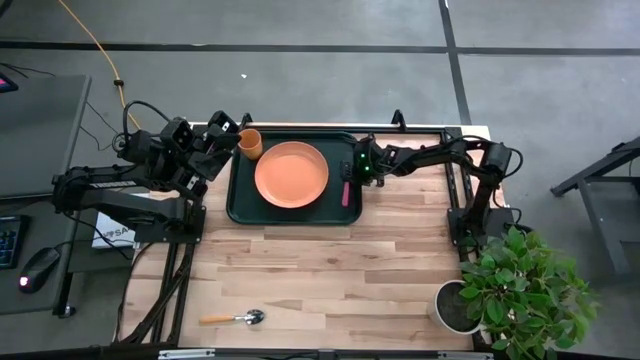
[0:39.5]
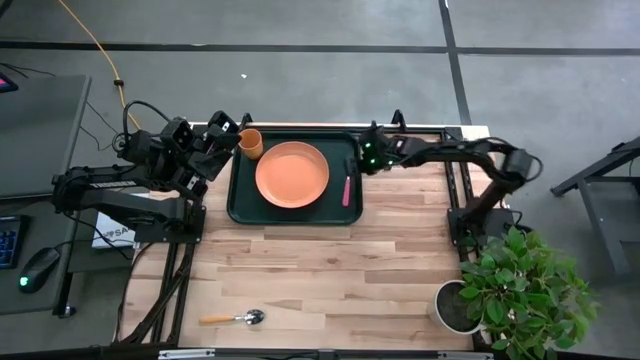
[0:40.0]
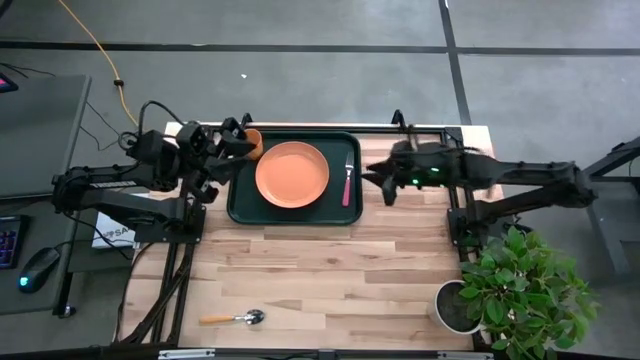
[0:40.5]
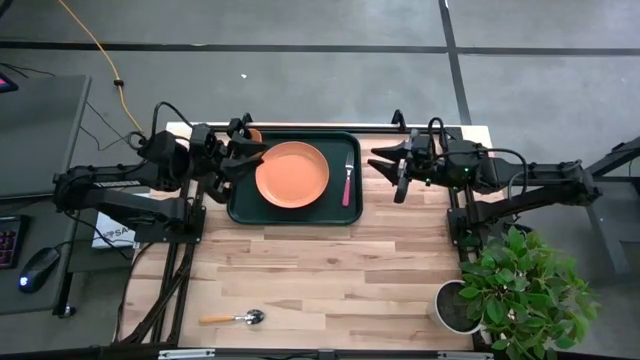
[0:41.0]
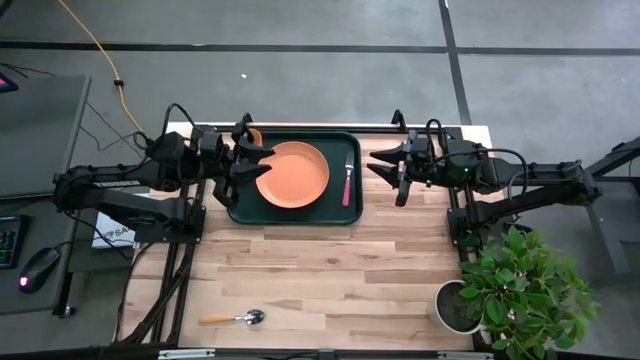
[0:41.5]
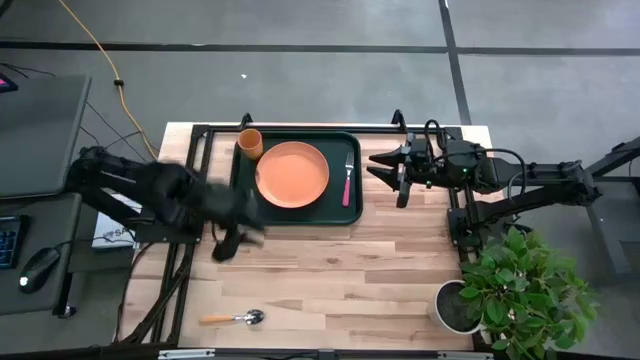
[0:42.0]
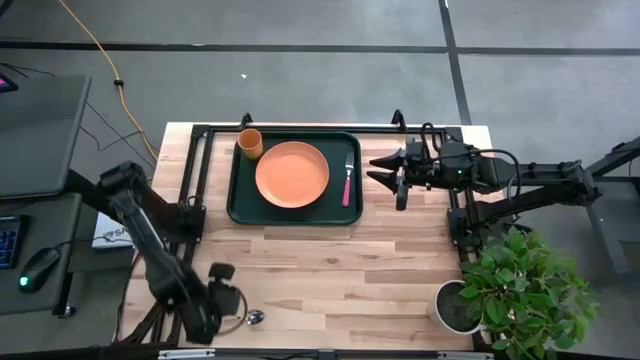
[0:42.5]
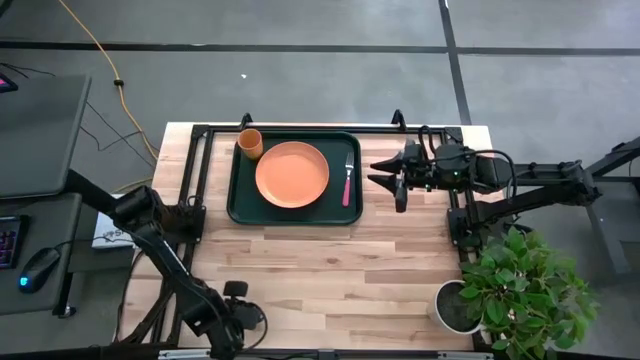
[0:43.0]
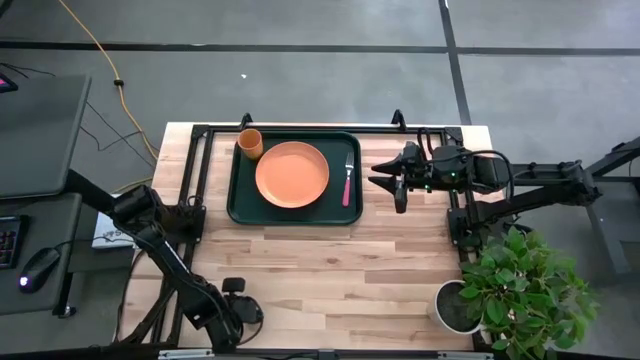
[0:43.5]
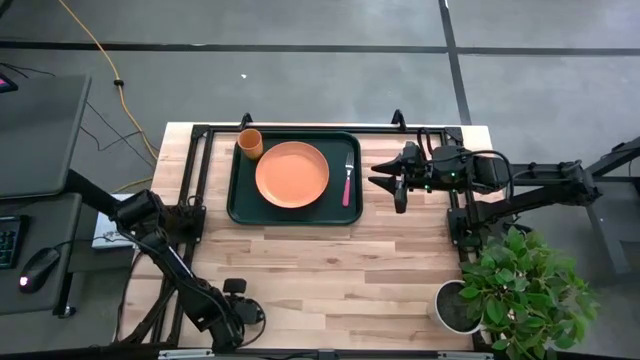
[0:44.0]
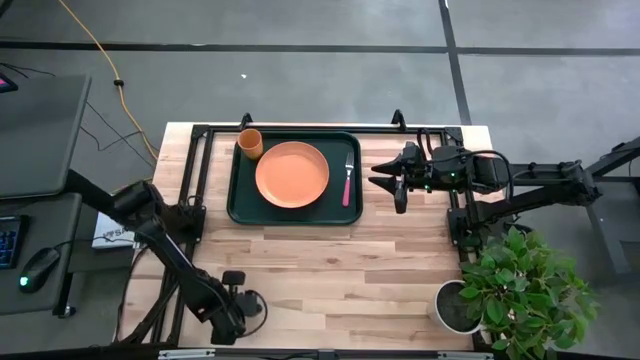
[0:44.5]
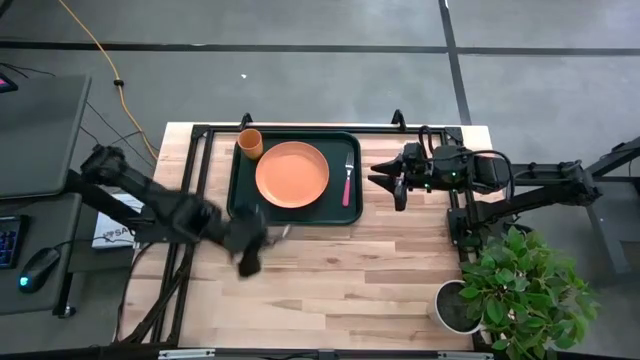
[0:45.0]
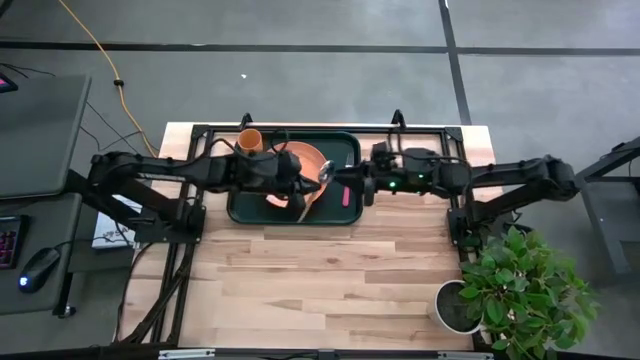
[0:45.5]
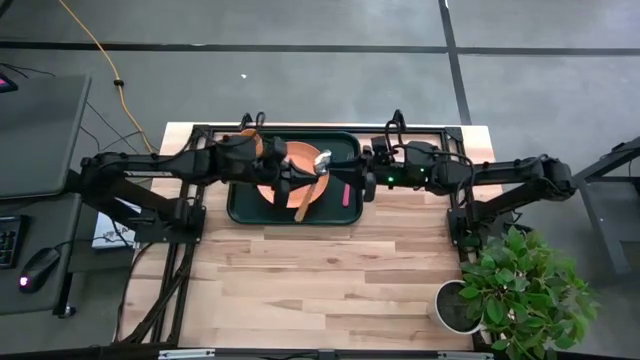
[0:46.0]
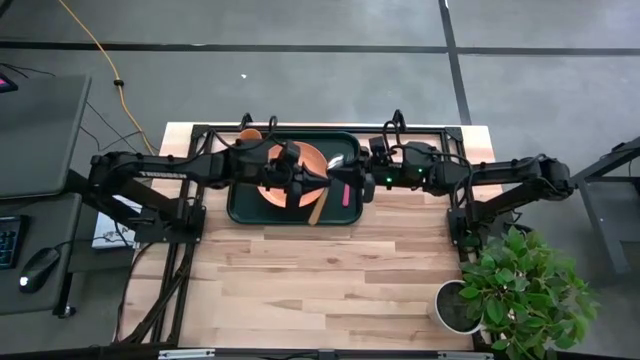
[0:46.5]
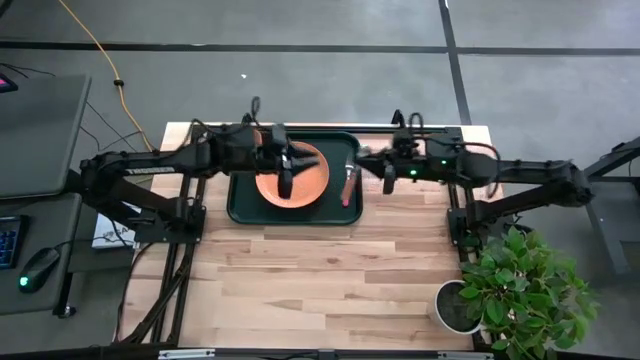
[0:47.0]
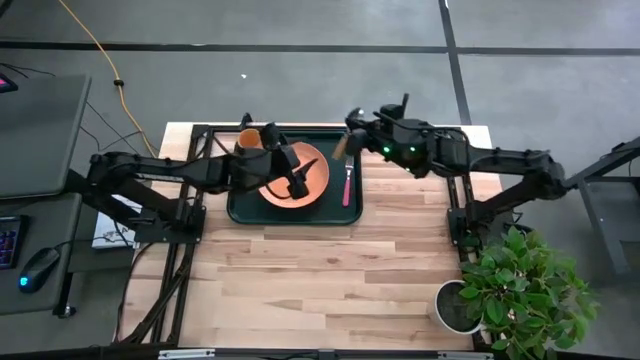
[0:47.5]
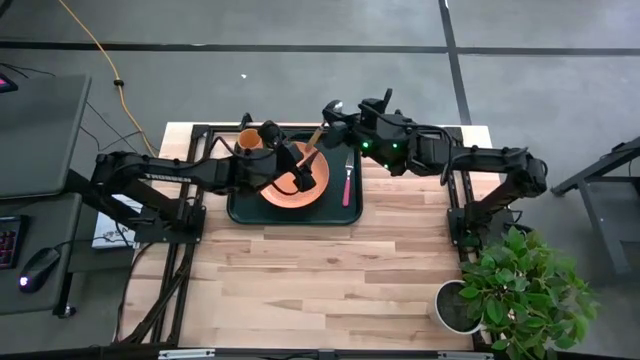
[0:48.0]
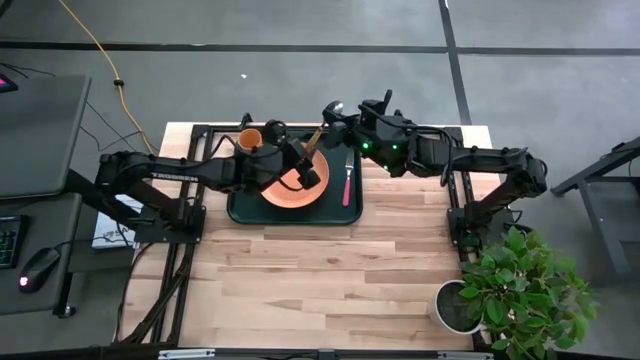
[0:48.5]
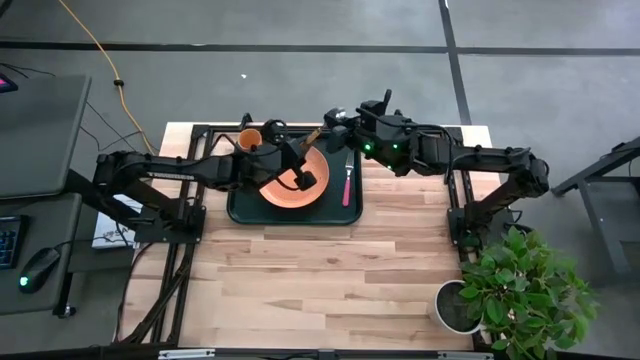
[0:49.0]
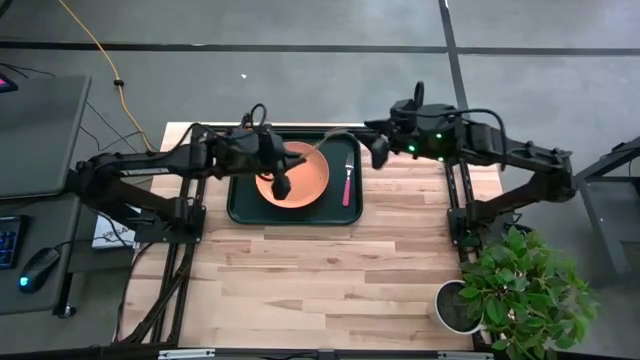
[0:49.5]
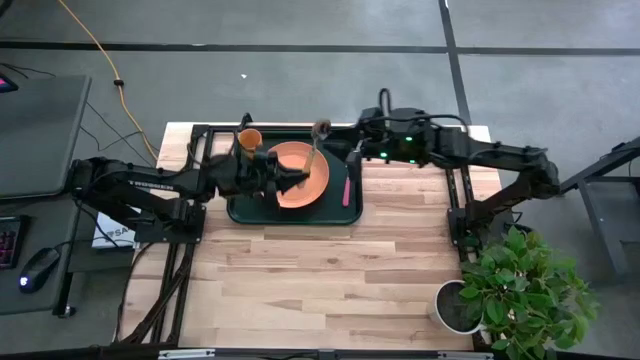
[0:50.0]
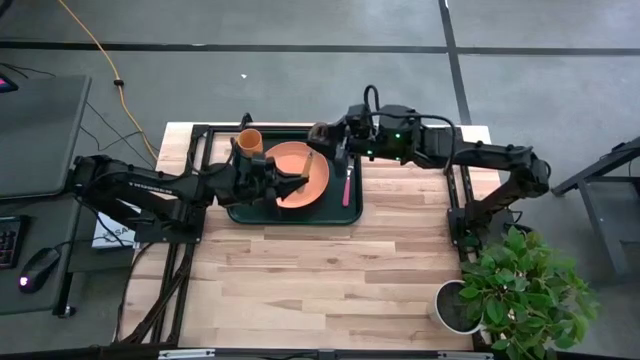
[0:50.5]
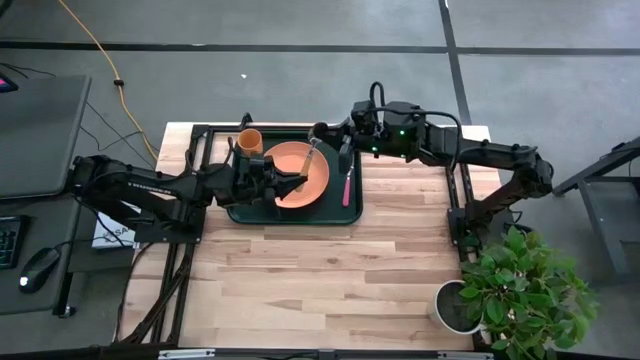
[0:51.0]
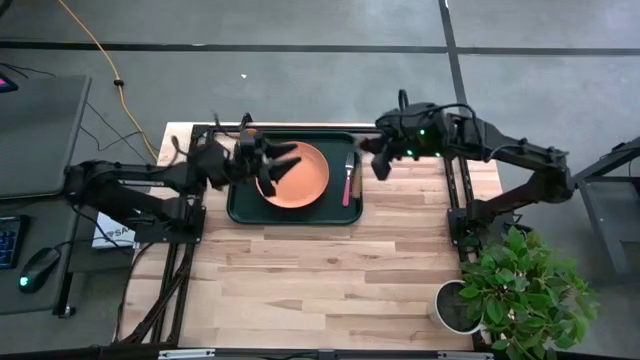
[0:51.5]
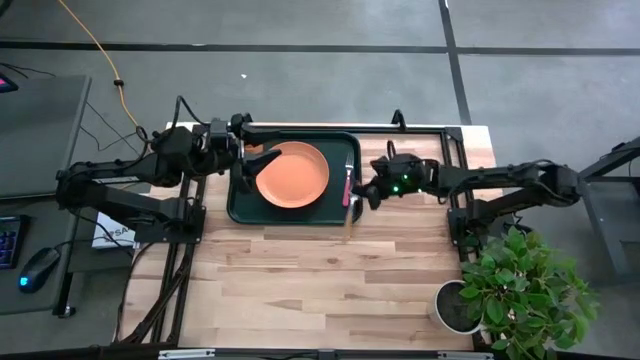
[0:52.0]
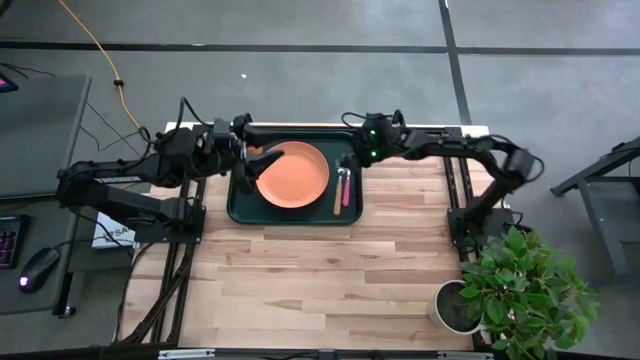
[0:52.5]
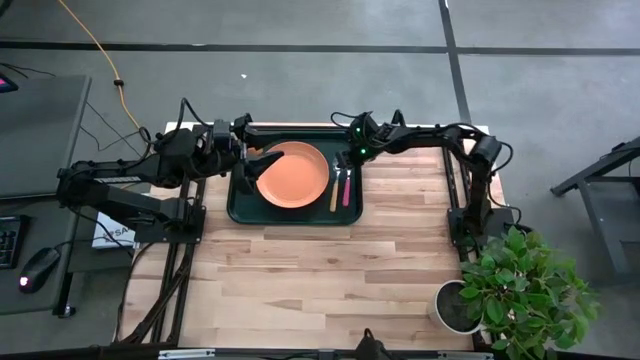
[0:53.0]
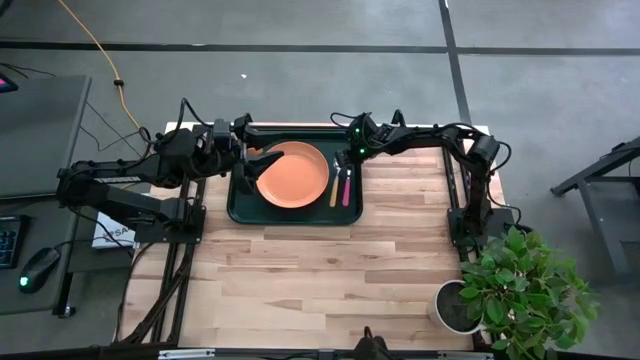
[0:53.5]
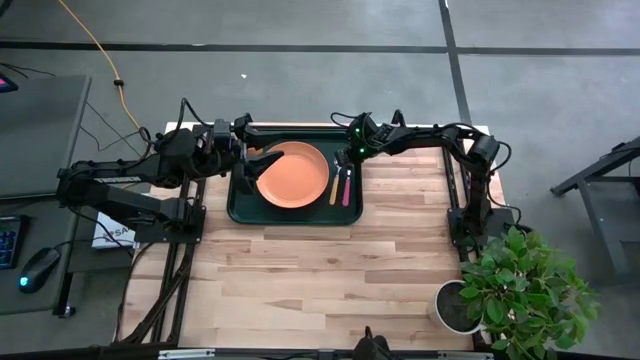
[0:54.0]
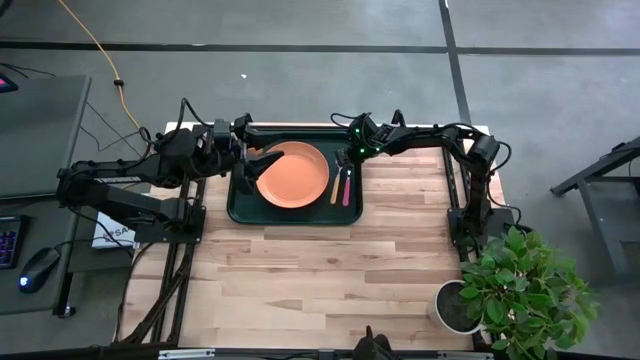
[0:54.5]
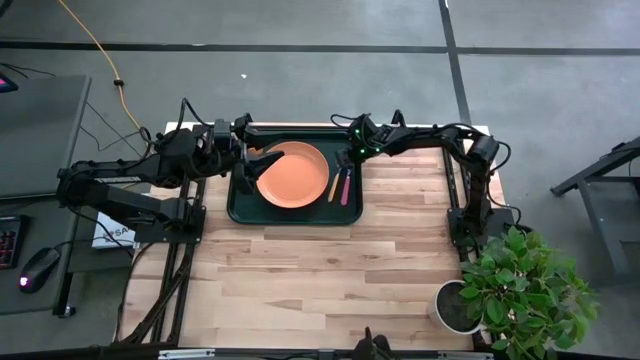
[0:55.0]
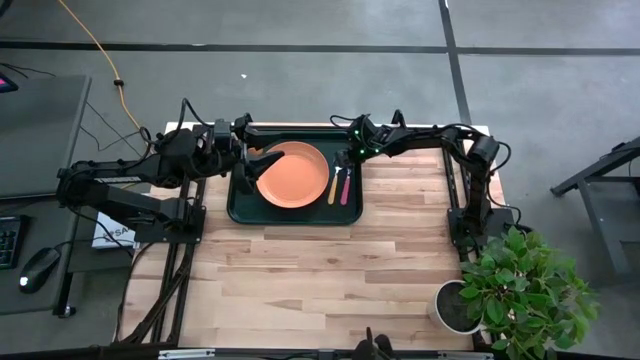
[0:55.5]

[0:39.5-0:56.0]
Task: Pick and place plate/cup/fork/spoon on tray
Put the yellow spoon on the black serving tray

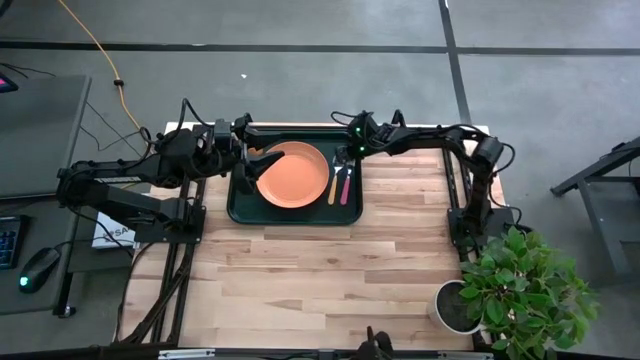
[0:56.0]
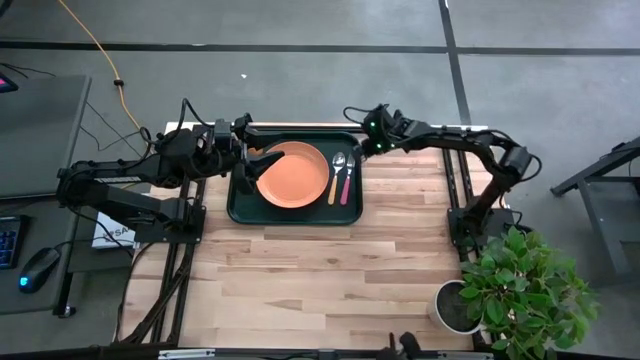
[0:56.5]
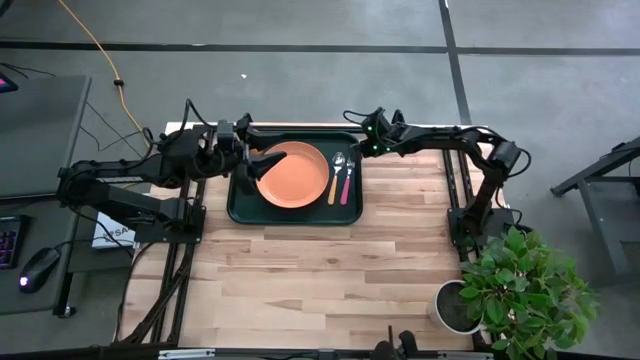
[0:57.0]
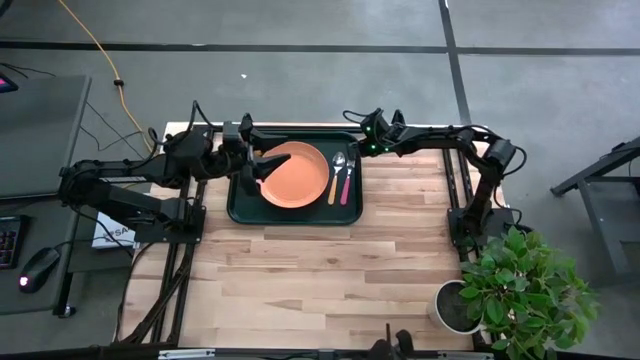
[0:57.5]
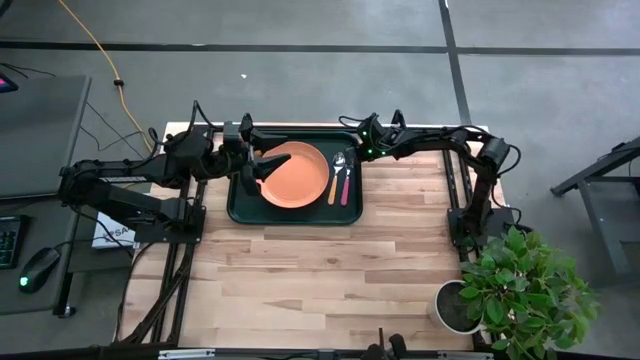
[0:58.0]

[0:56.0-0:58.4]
Adjust the pink fork on the black serving tray

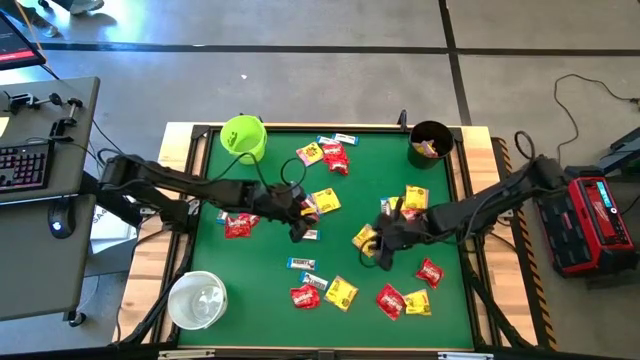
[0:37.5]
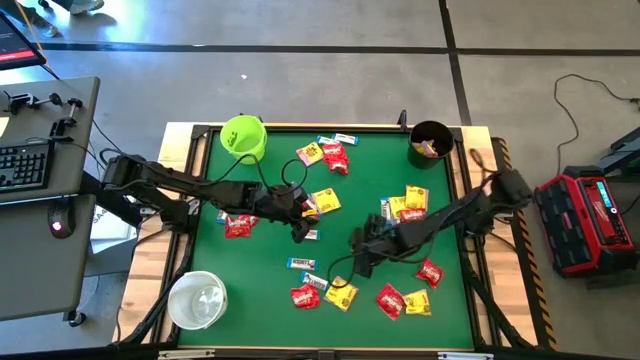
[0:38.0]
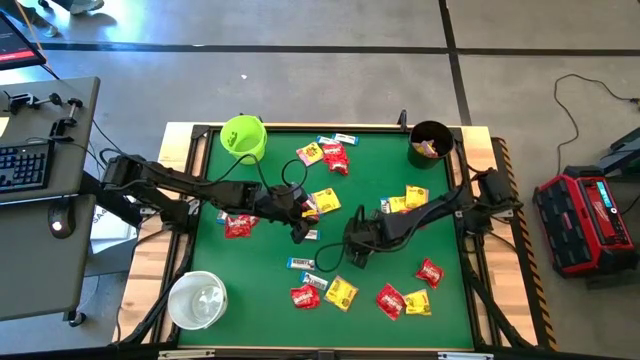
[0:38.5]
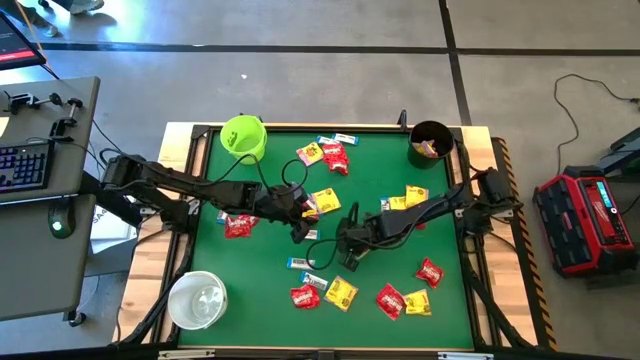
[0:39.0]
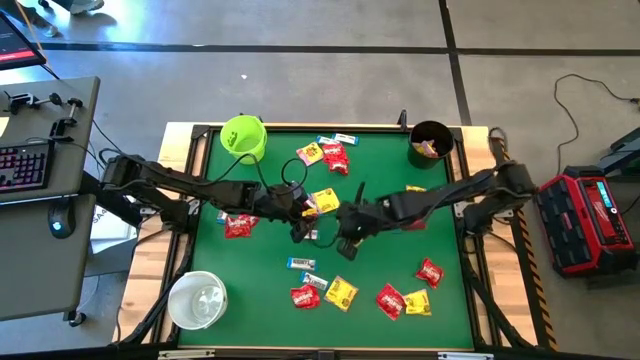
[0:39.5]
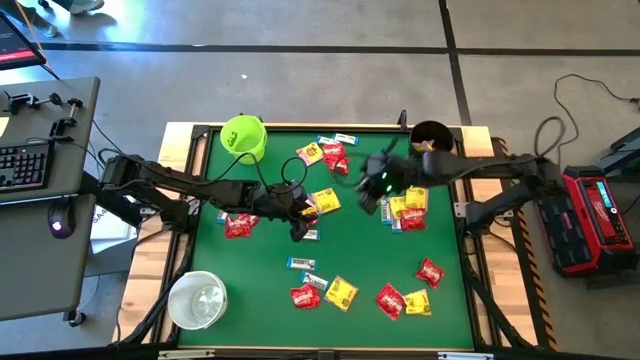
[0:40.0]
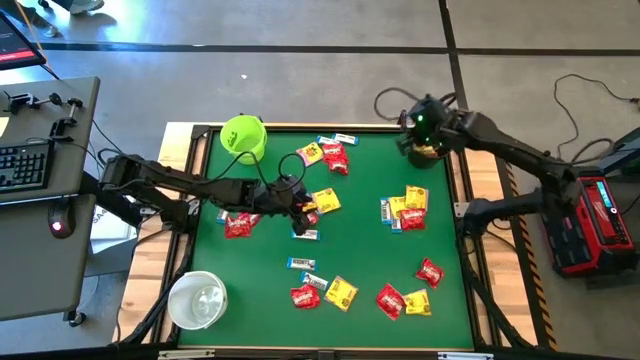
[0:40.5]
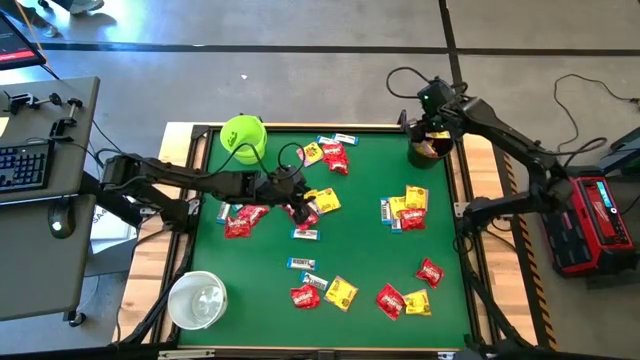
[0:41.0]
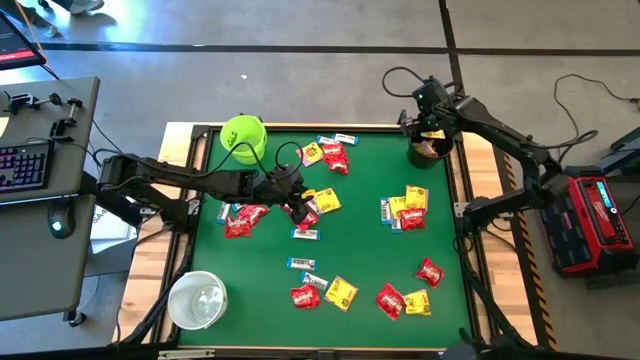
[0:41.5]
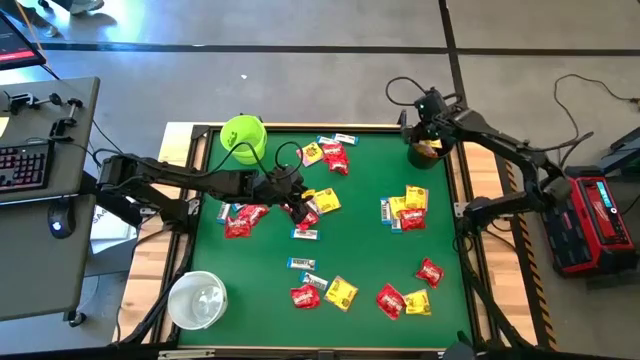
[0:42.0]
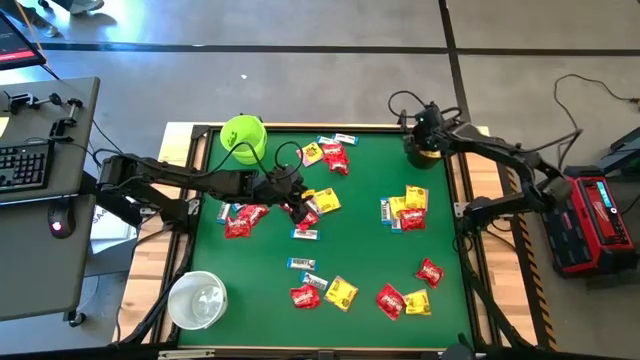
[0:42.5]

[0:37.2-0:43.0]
Task: Sort candy by brand, put in halloween buckets
Put the yellow candy into the black bucket
